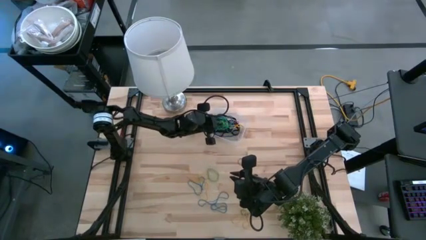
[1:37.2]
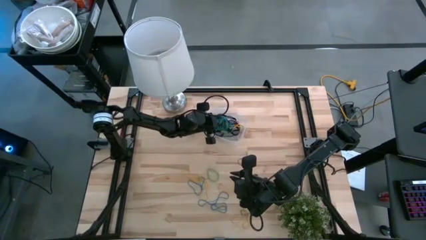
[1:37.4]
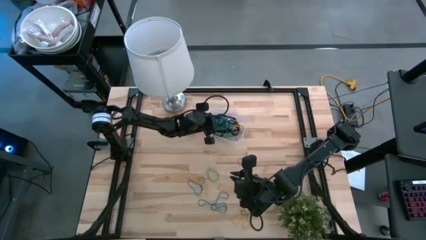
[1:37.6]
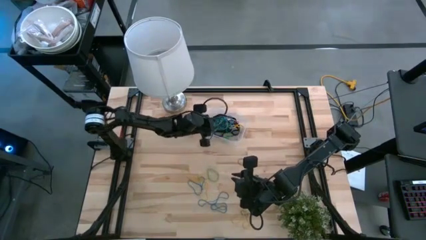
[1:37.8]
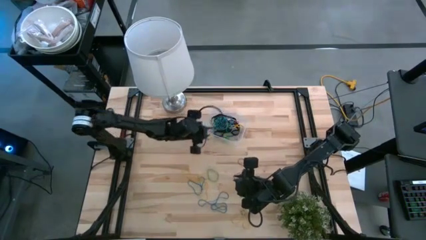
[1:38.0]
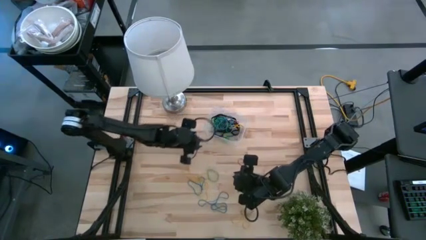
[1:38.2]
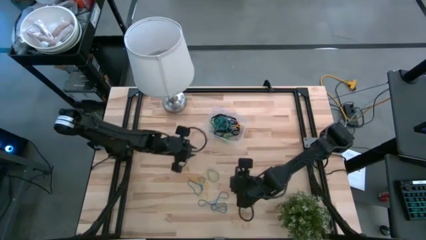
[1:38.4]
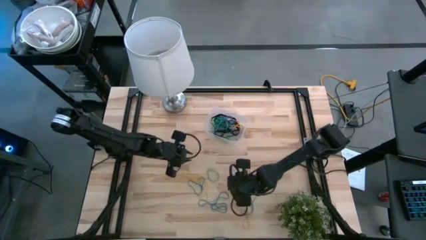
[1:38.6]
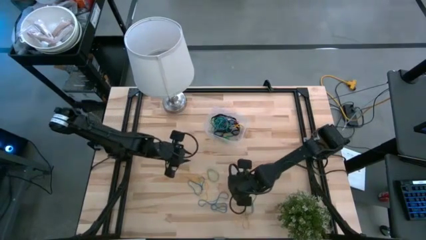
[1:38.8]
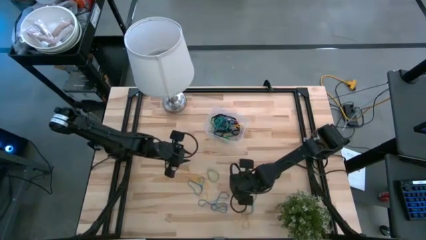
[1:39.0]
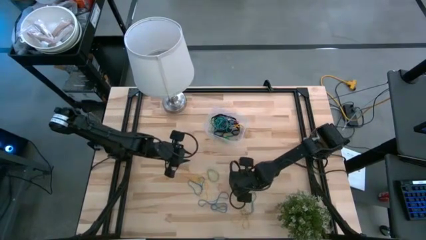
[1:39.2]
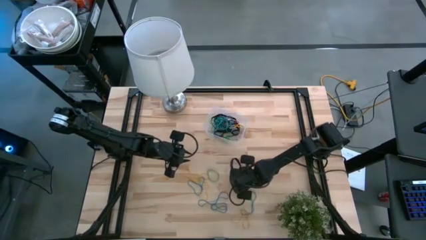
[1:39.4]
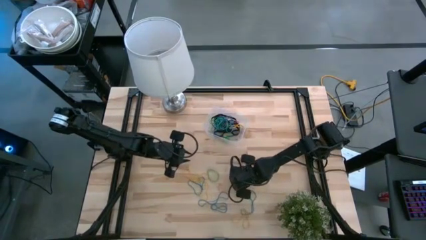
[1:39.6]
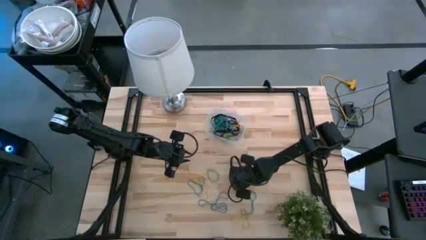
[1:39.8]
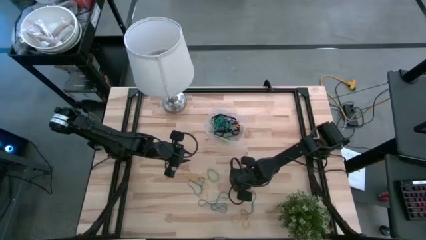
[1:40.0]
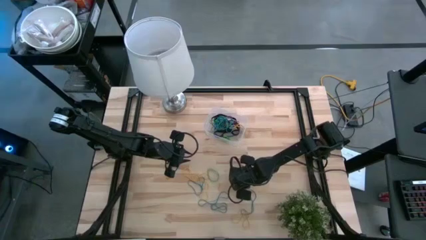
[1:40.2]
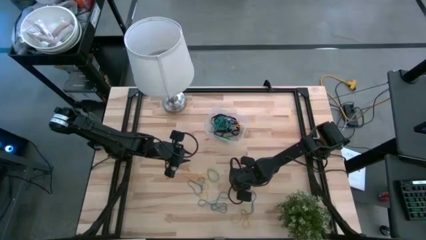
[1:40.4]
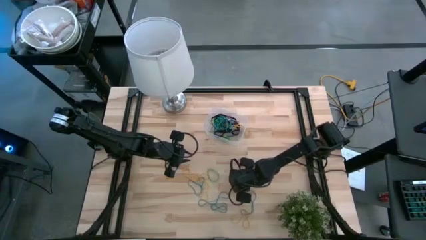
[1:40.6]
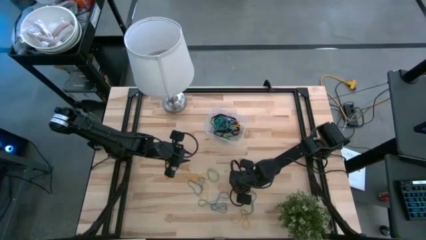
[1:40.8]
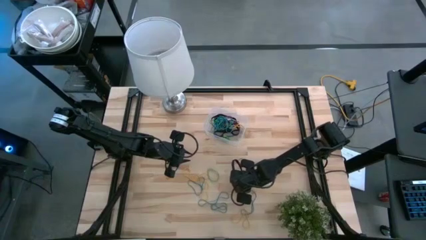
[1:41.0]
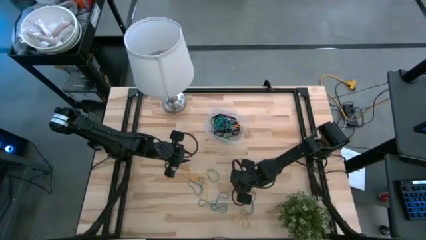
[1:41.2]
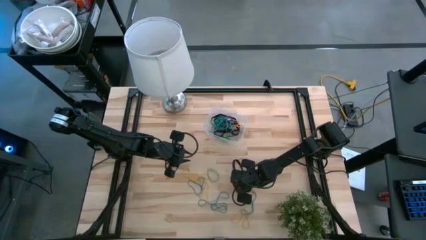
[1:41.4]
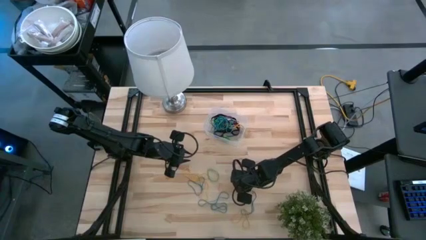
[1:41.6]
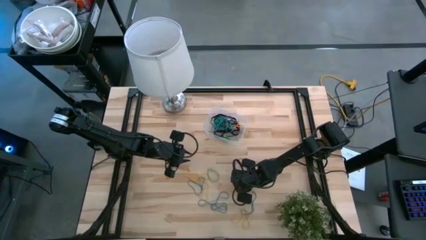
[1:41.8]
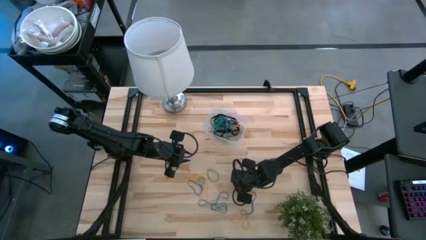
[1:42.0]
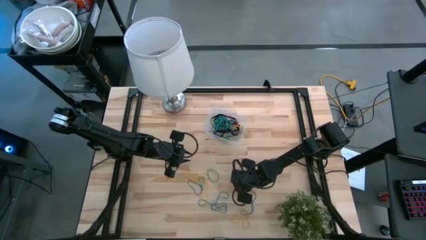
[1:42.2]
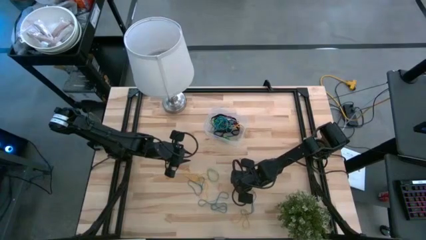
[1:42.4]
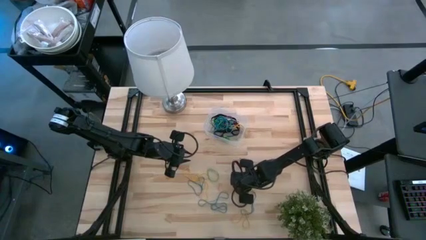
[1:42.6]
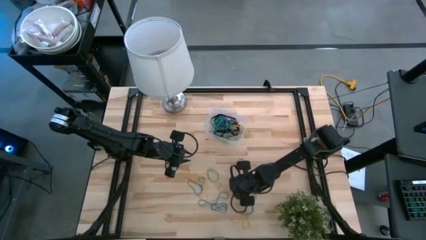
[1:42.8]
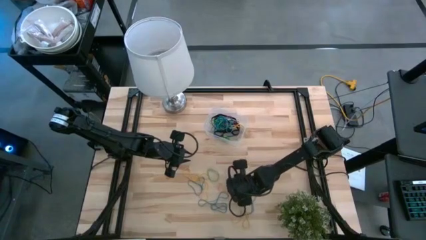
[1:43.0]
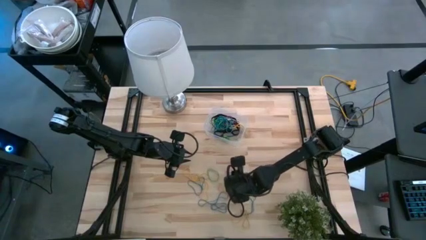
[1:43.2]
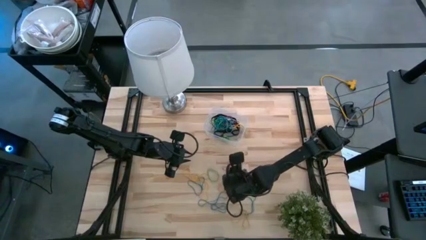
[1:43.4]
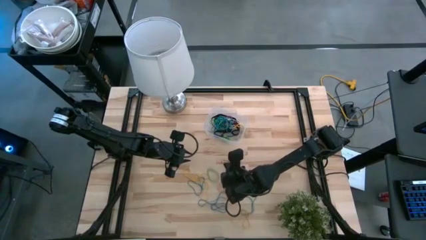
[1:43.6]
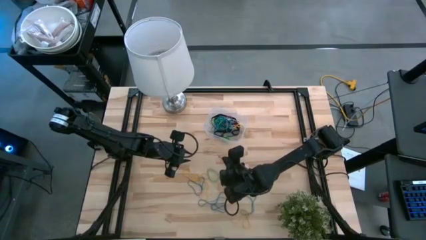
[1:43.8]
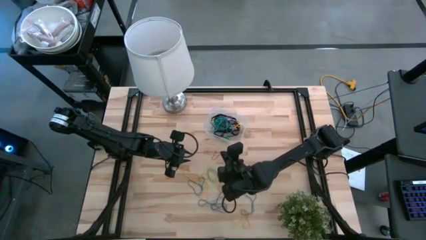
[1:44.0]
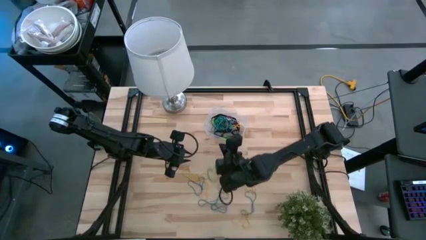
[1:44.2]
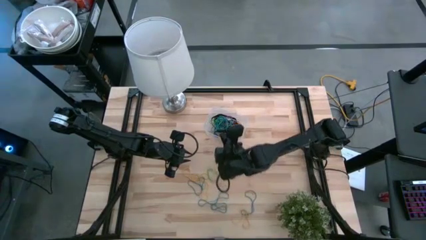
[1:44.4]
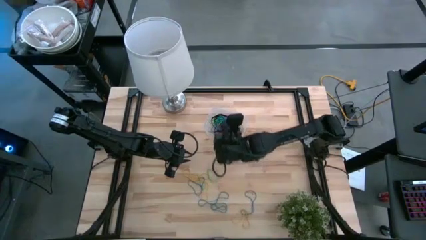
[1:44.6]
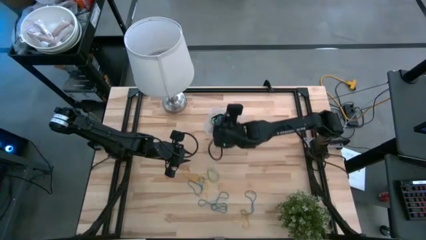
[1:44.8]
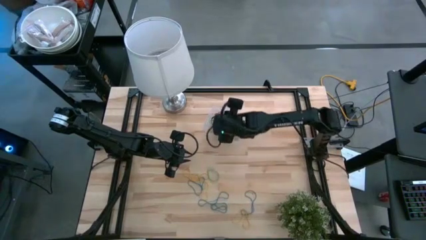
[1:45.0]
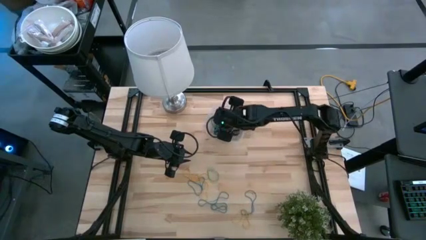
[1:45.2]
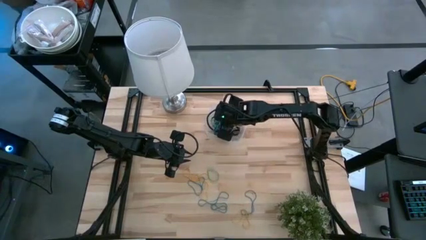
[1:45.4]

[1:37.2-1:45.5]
Task: Pick and place rubber bands into bin
Put the red rubber bands into the bin

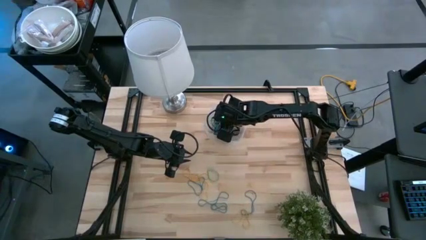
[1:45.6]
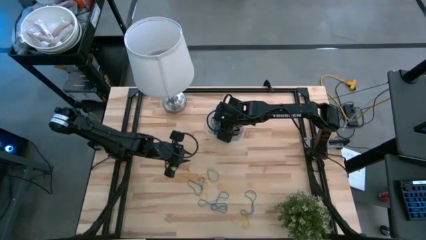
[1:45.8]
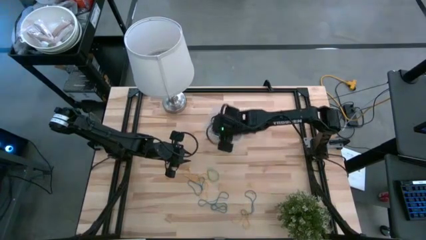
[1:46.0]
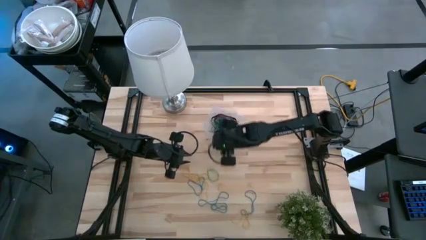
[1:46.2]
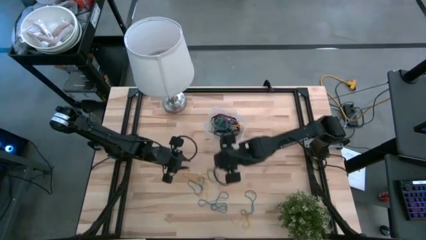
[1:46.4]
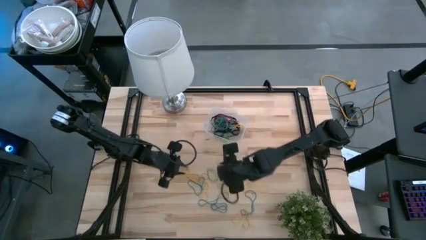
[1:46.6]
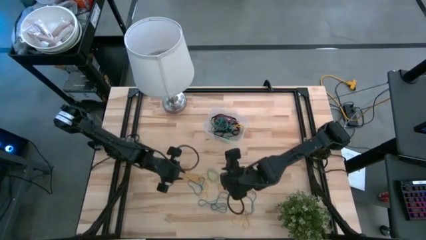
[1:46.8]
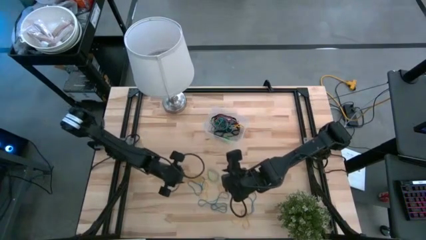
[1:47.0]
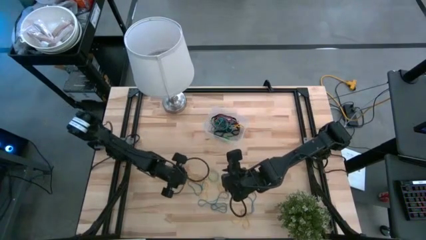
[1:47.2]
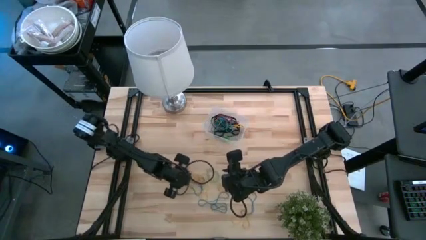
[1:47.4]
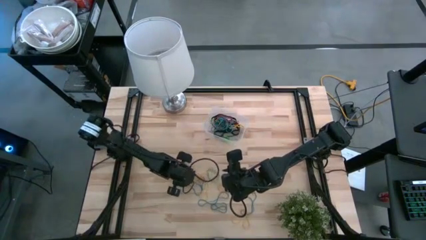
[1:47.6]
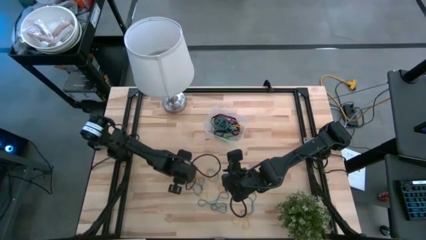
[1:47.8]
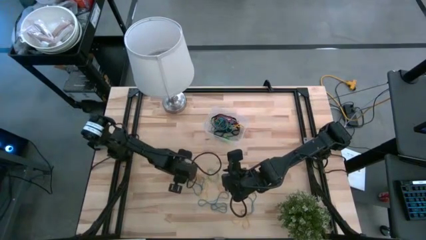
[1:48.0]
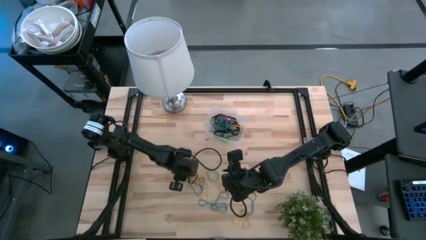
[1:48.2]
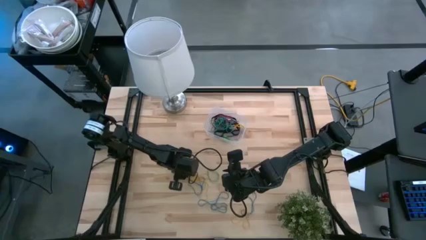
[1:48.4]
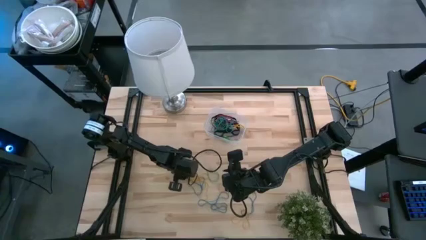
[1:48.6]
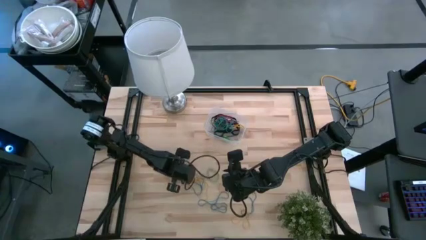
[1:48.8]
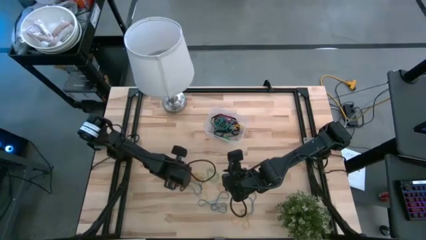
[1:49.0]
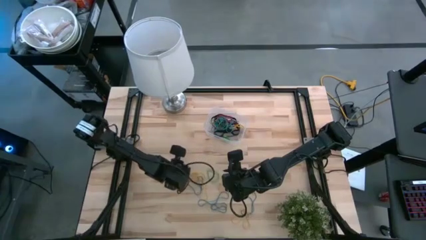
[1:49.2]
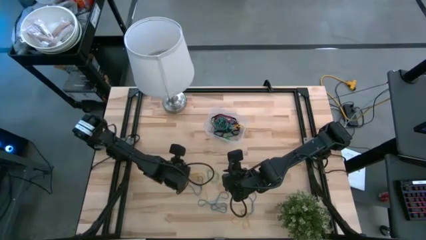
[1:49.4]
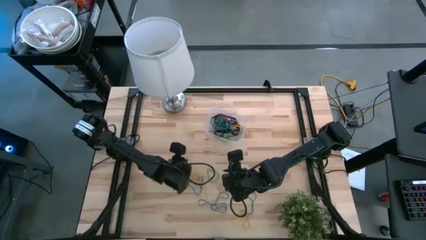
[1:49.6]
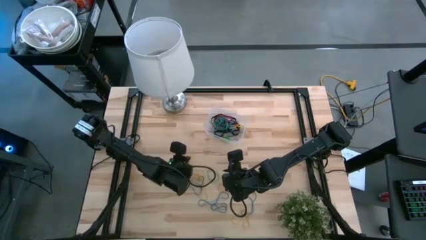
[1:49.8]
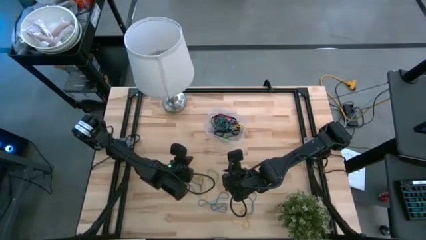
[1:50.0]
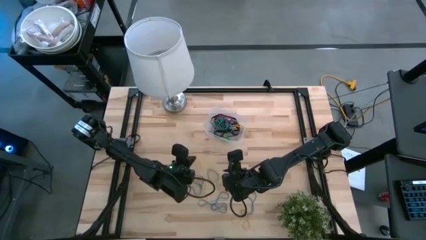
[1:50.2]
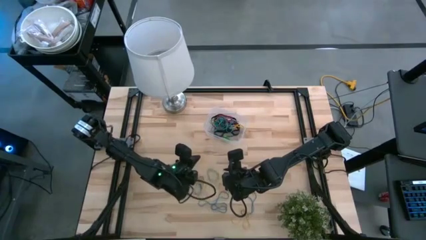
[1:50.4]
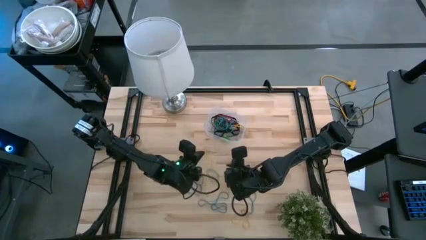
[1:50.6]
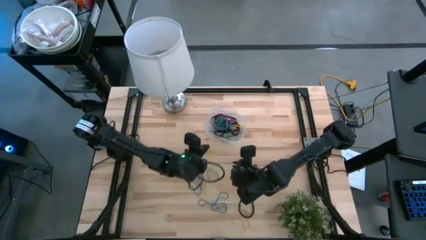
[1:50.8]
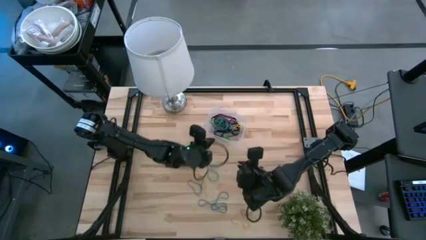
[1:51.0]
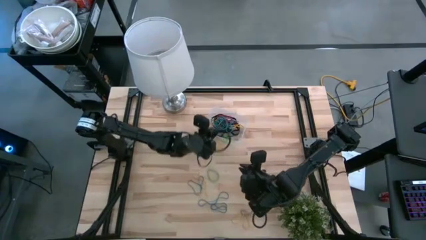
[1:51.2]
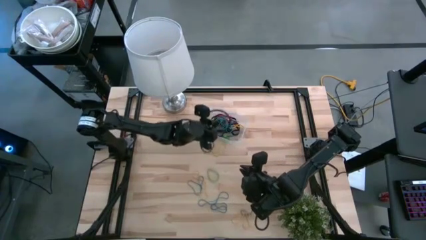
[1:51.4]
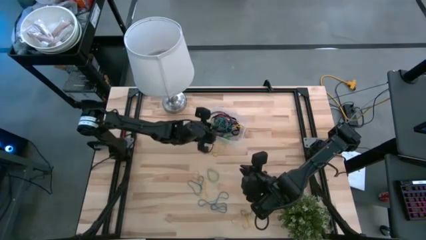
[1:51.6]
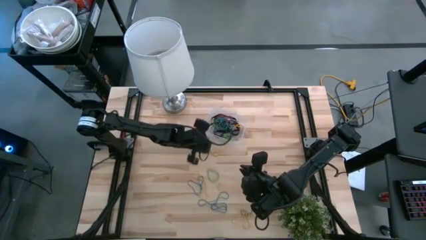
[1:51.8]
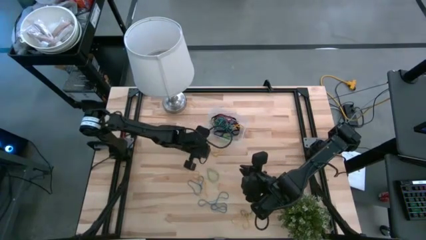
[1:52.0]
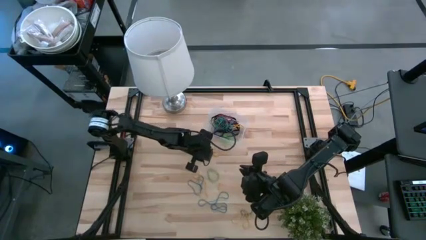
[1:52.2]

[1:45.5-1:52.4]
Put the yellow rubber bands into the bin

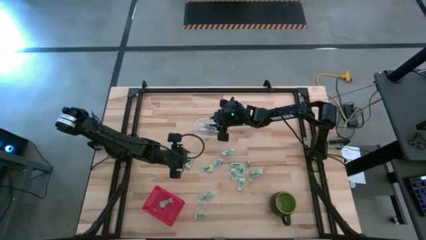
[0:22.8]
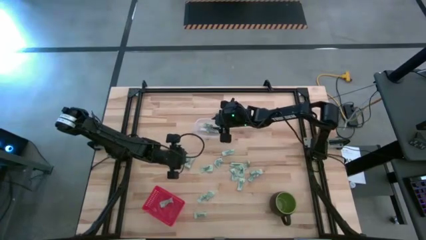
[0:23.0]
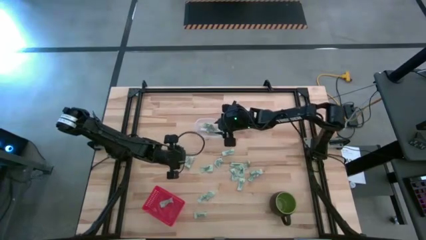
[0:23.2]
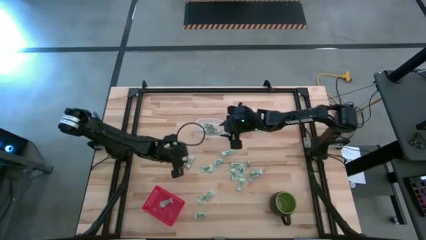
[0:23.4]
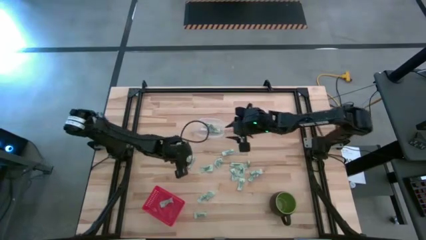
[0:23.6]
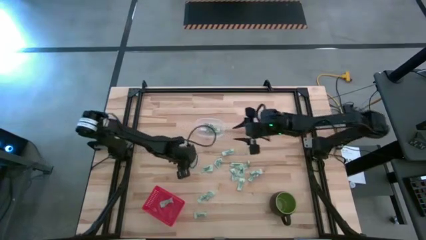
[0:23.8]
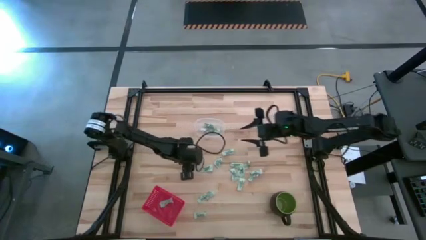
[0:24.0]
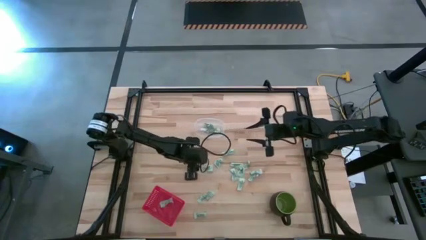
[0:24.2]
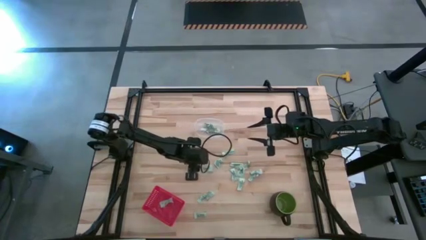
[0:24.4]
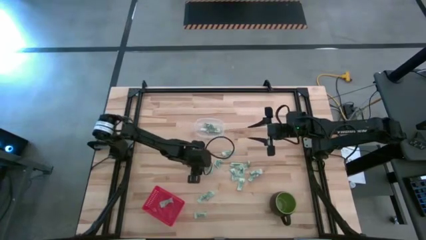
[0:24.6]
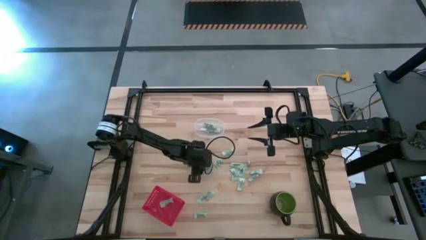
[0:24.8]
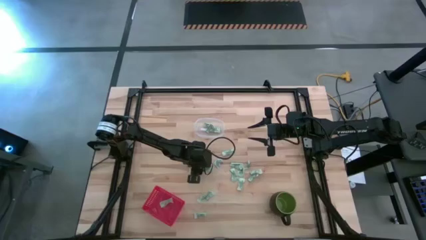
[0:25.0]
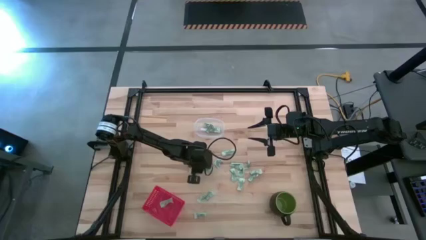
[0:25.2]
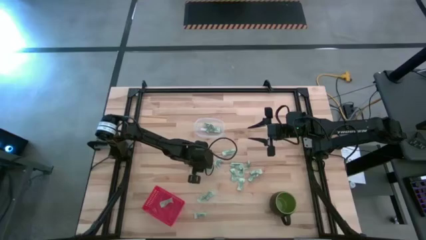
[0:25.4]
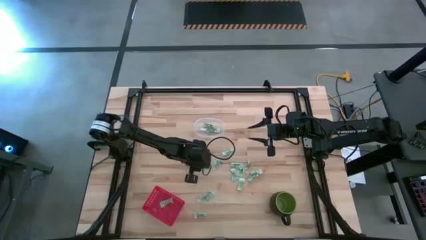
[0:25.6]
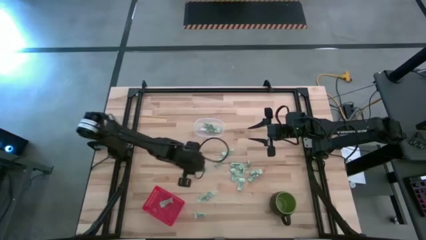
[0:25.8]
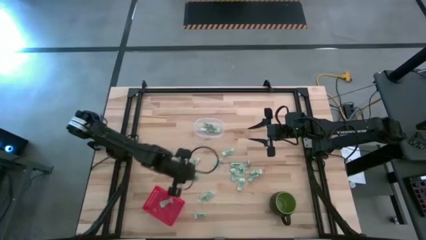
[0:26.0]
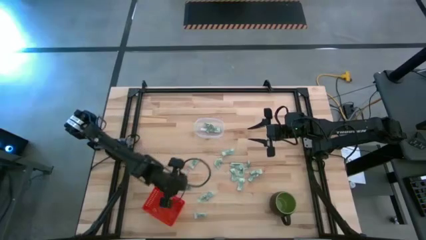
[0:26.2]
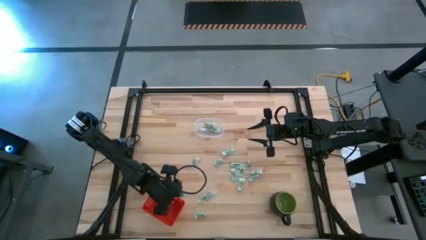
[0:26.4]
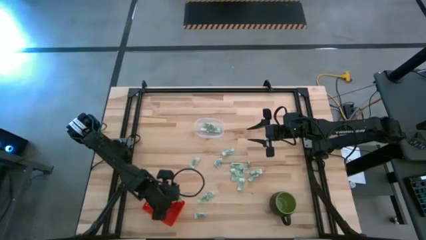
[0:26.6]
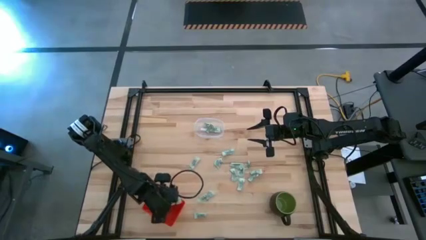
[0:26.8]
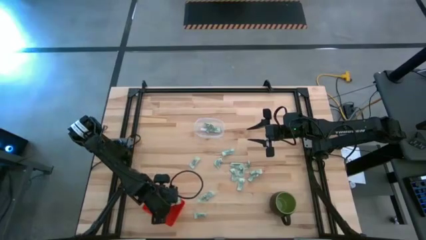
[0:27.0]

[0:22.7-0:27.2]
Task: Pick and place items into bin
Put the stevia packet into the orange bin
